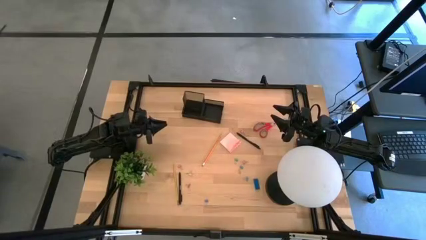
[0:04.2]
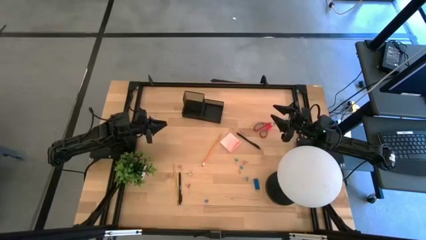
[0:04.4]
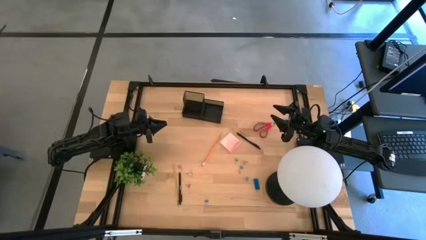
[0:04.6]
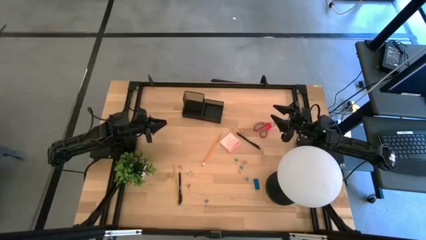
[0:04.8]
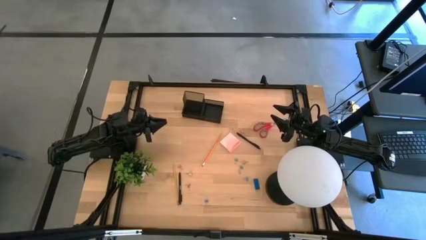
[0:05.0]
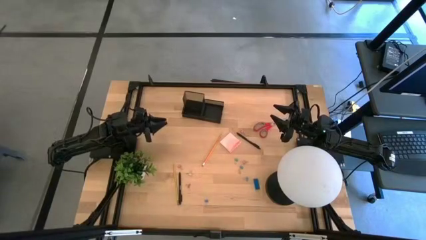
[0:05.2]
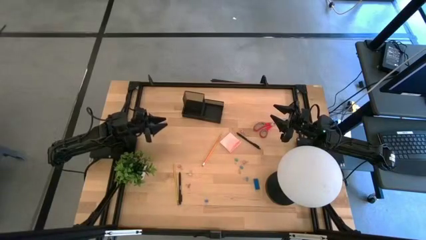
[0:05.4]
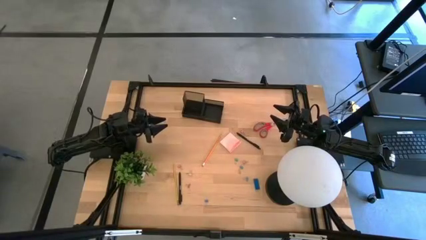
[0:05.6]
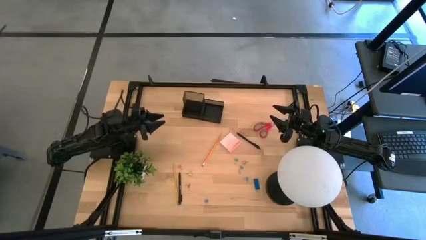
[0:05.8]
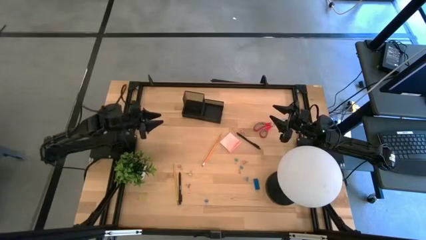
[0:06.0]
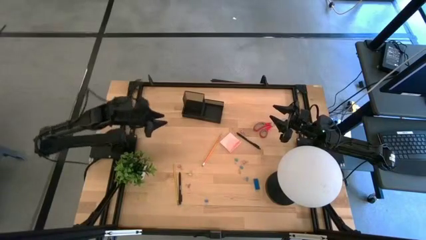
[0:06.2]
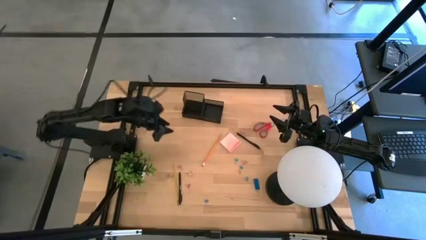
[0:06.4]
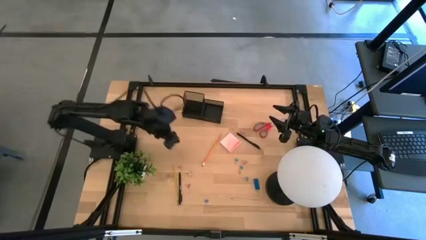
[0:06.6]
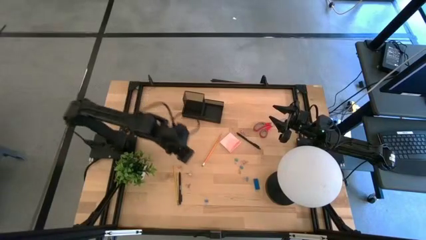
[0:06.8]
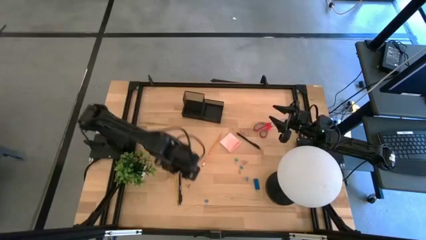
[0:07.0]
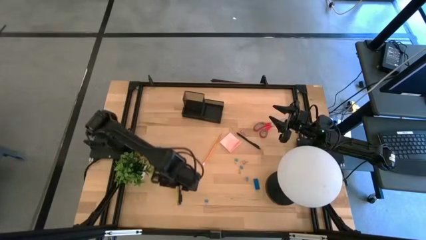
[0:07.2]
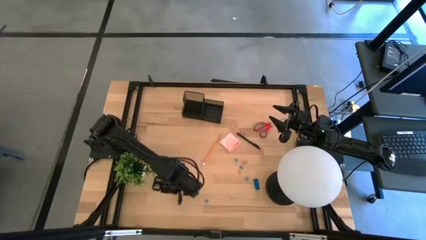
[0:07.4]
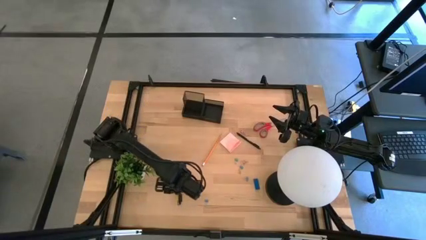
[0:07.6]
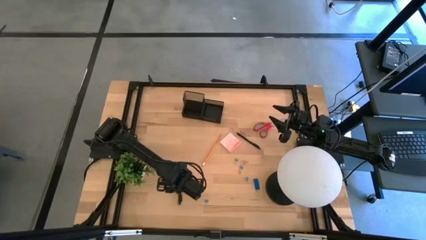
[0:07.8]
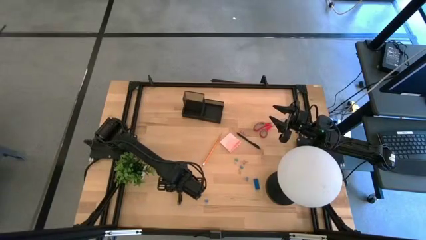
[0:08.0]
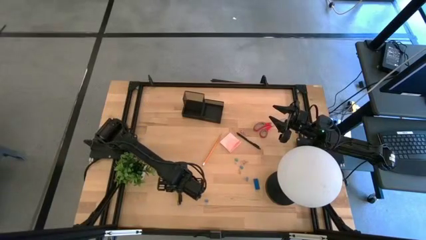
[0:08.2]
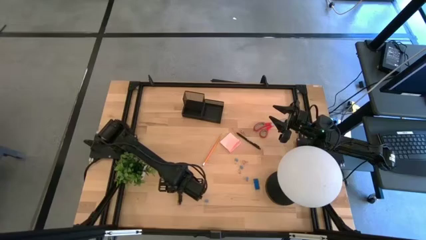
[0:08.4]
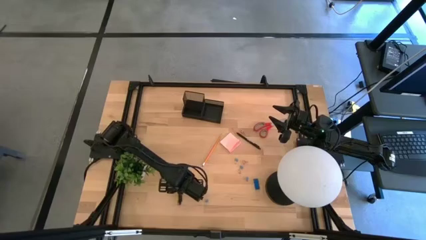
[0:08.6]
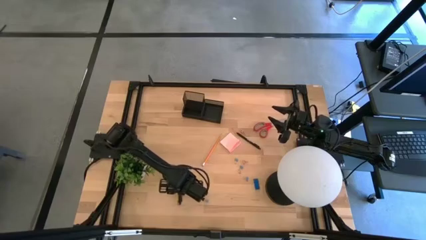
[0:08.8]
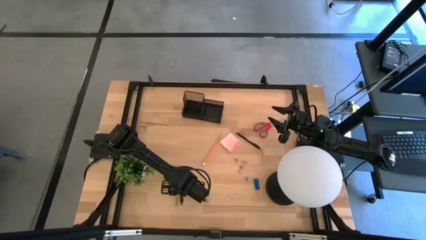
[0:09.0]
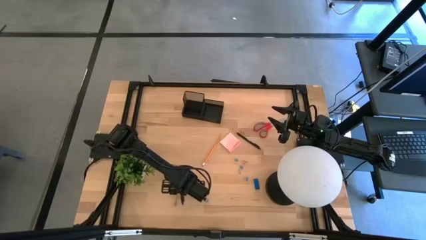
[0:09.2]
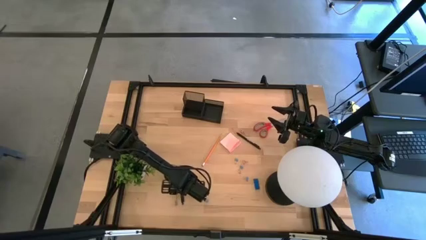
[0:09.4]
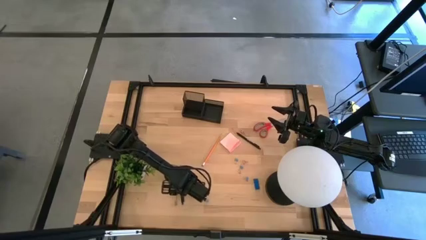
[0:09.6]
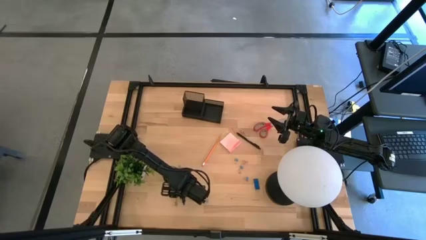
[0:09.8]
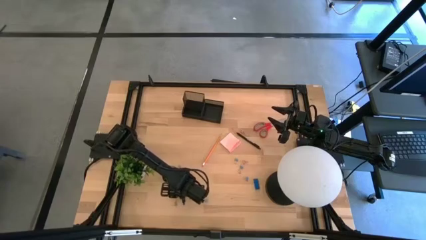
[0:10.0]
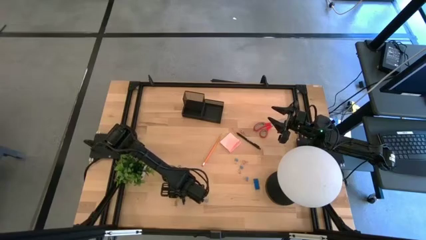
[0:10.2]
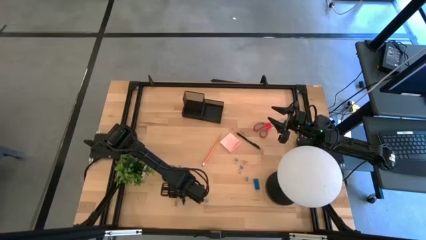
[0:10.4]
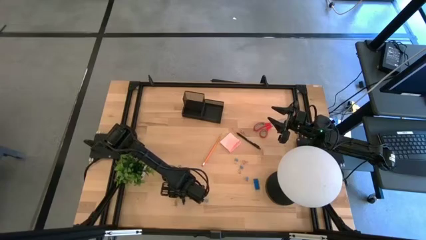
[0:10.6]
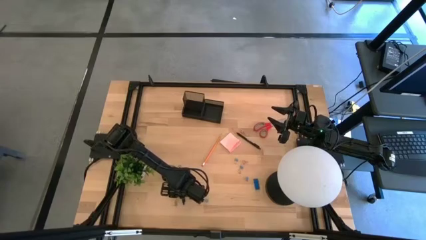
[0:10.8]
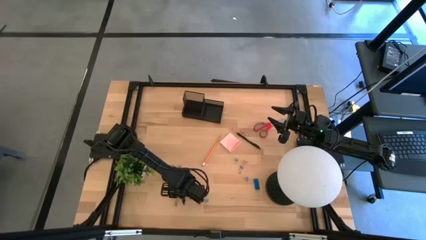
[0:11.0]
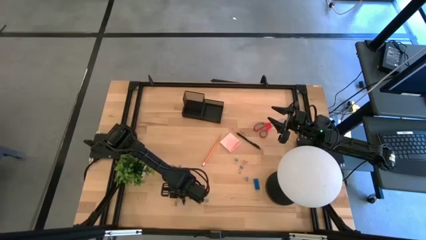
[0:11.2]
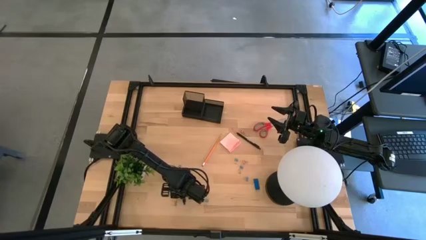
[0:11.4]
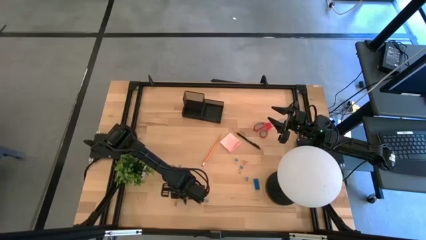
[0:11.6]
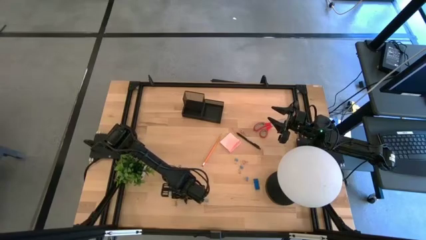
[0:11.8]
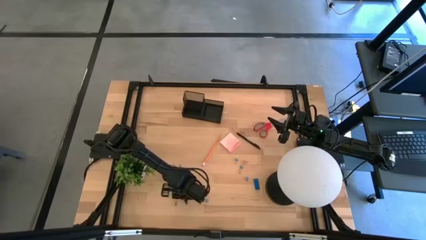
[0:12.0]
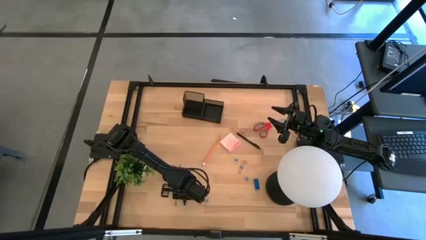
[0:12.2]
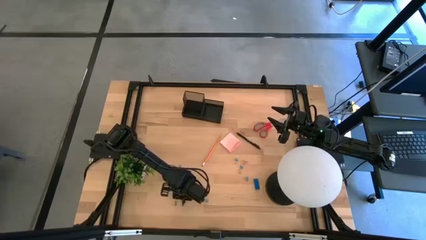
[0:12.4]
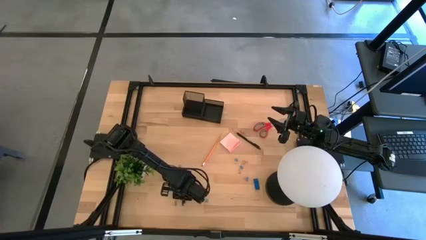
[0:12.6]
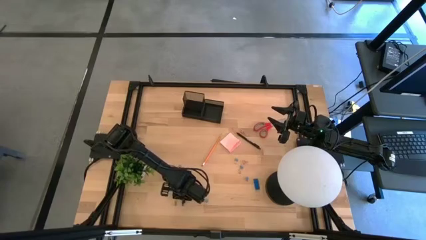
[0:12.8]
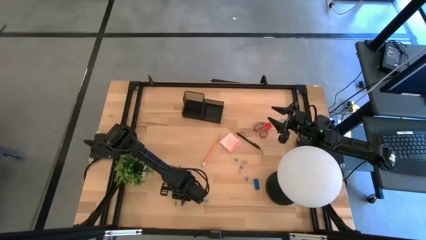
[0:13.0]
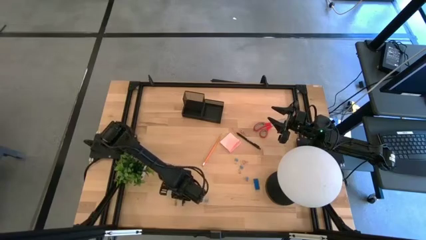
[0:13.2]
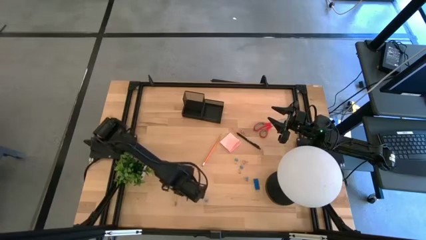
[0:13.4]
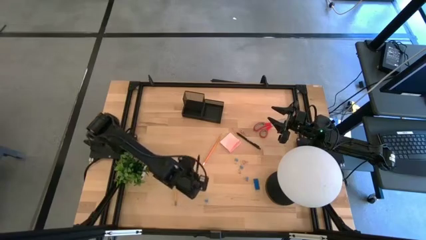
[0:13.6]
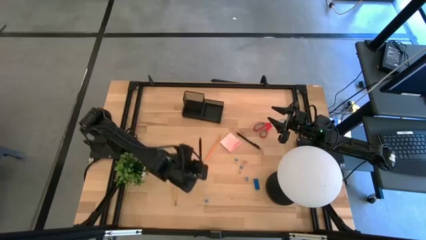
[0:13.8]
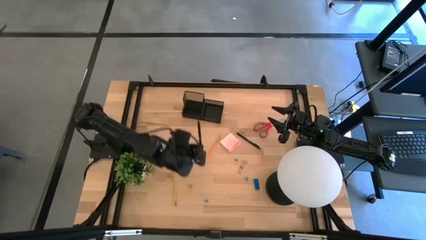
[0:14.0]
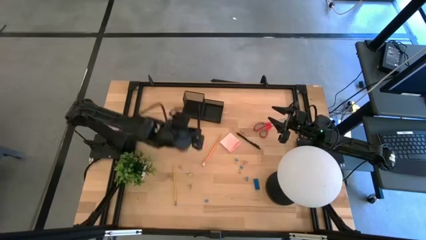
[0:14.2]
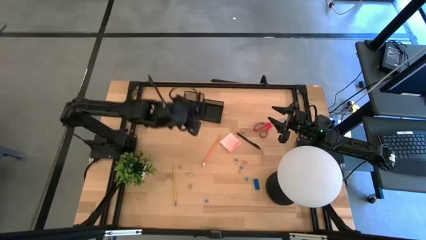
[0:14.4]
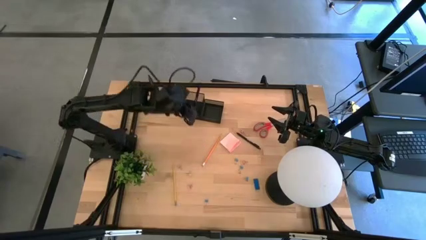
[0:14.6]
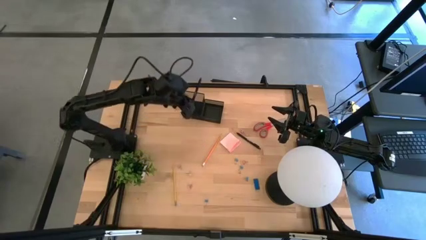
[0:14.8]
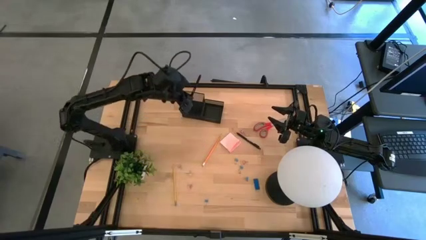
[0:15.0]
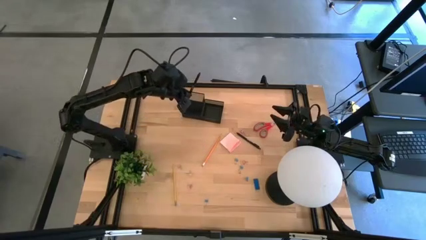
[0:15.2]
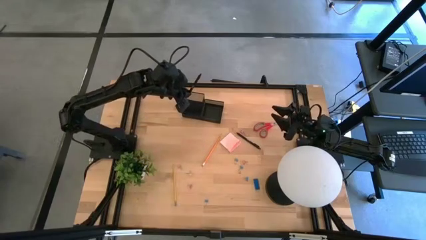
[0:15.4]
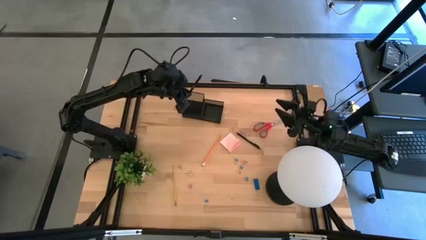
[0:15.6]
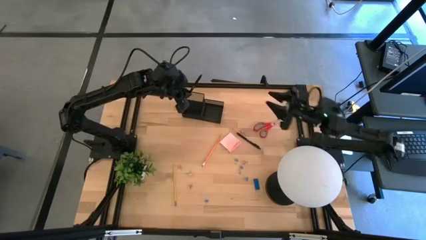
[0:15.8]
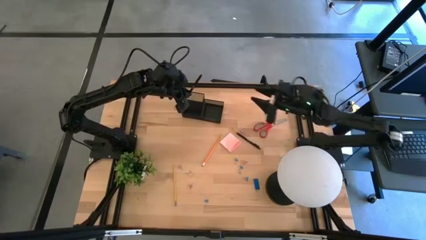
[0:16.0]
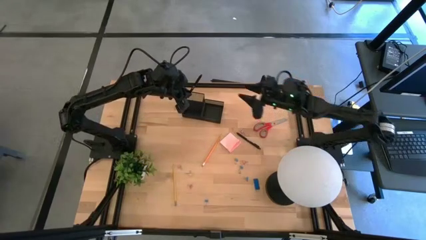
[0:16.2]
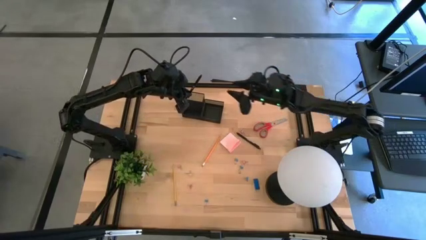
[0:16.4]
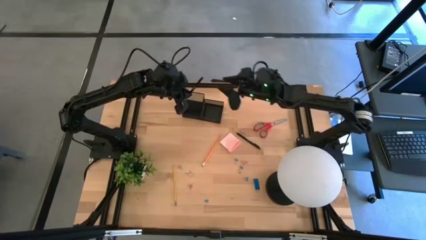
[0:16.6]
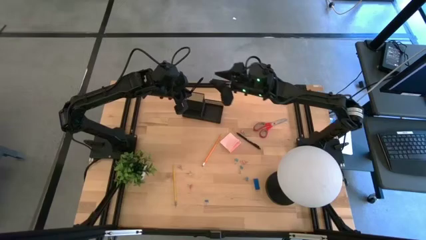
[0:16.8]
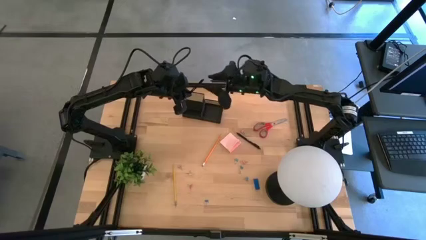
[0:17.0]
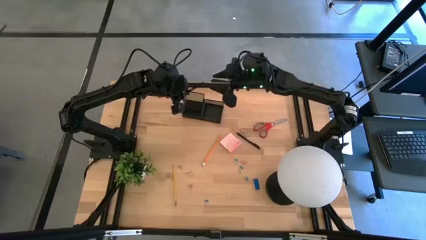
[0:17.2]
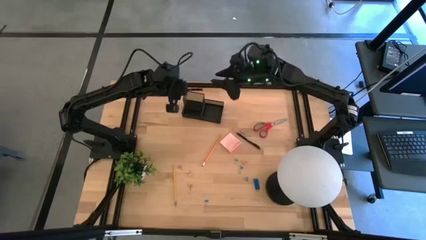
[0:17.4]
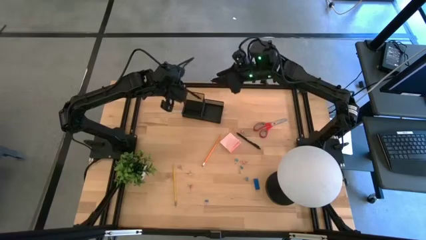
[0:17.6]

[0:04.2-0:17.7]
Task: Pick and place office supplies into organizer
Put the black pen into the black desk organizer
